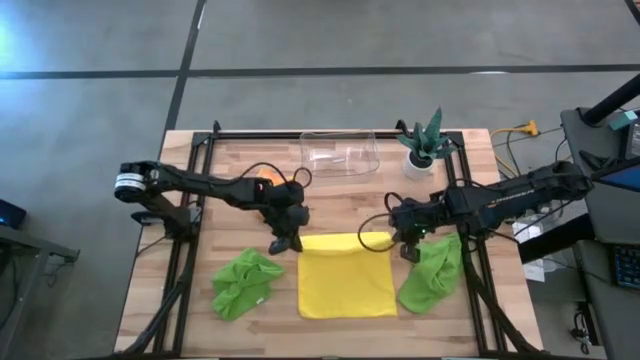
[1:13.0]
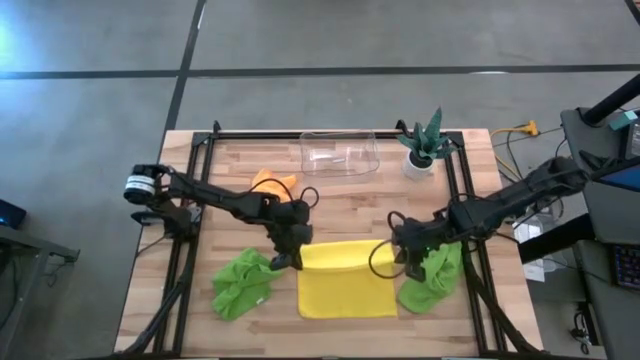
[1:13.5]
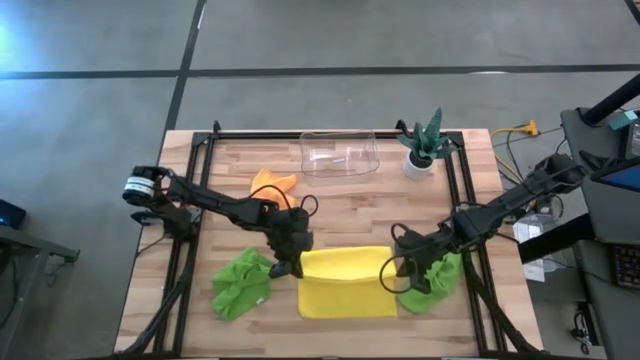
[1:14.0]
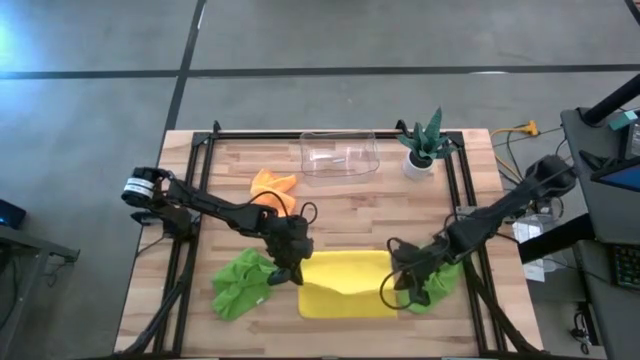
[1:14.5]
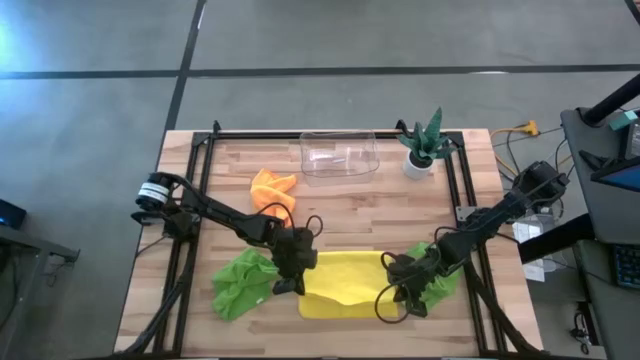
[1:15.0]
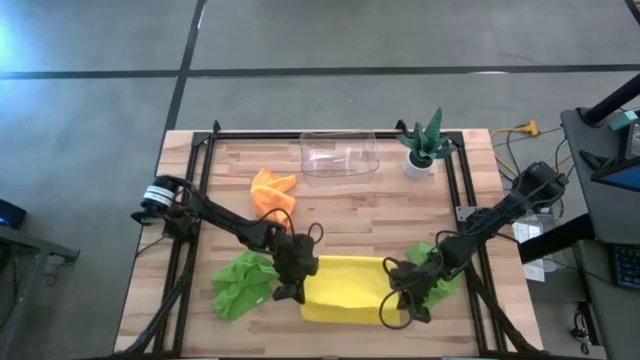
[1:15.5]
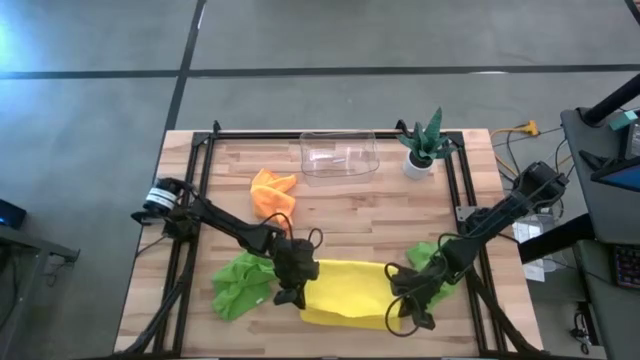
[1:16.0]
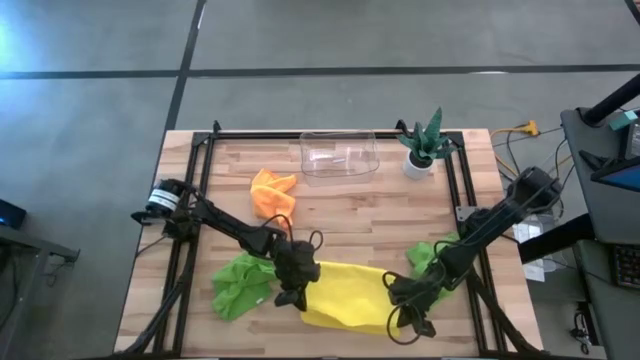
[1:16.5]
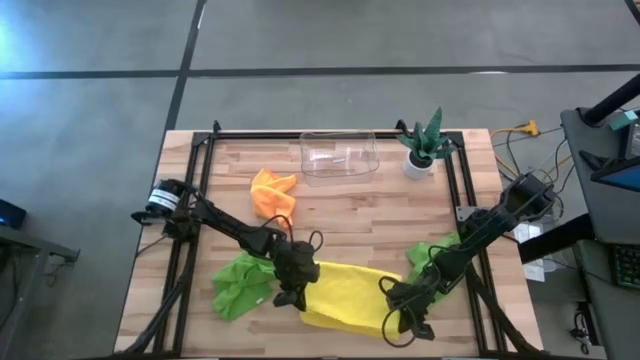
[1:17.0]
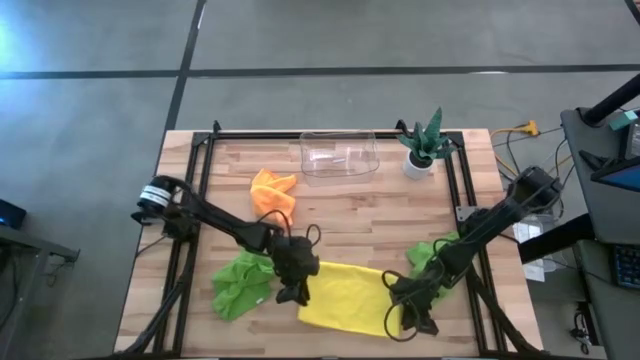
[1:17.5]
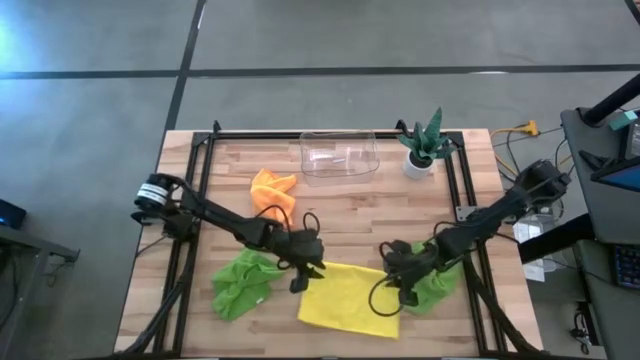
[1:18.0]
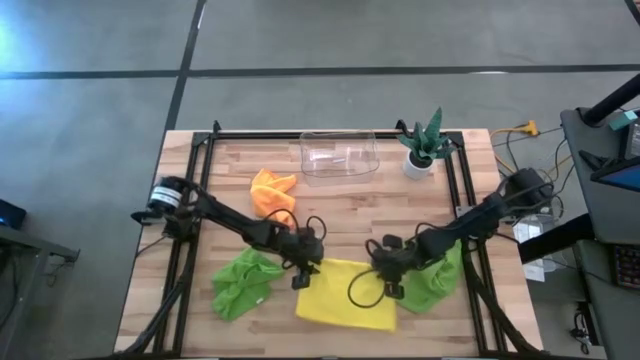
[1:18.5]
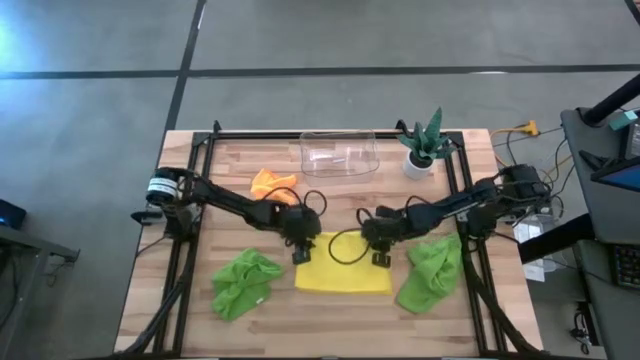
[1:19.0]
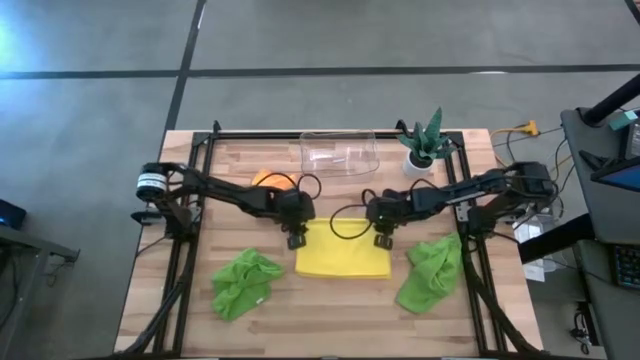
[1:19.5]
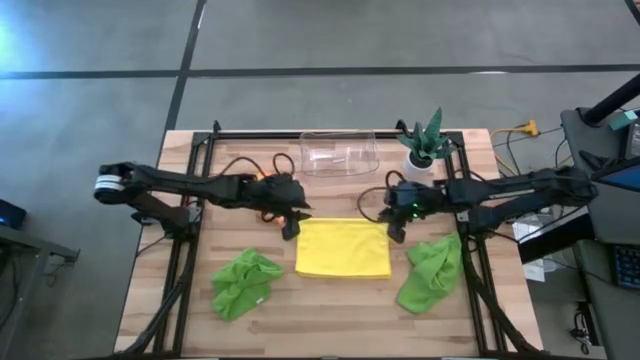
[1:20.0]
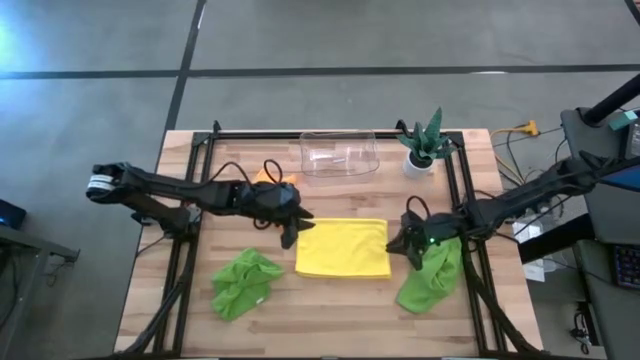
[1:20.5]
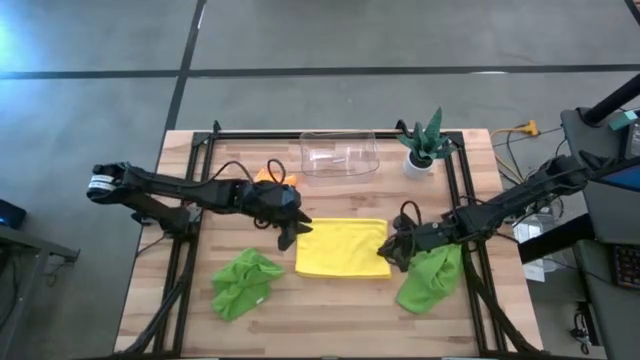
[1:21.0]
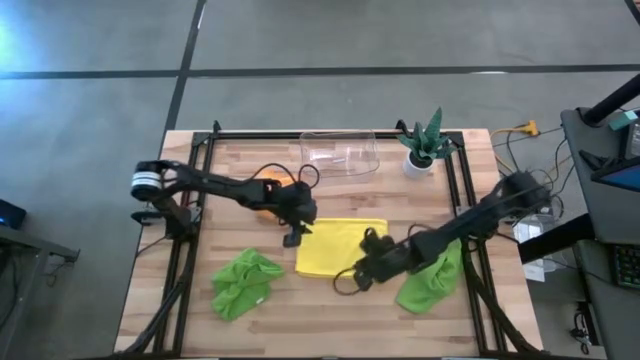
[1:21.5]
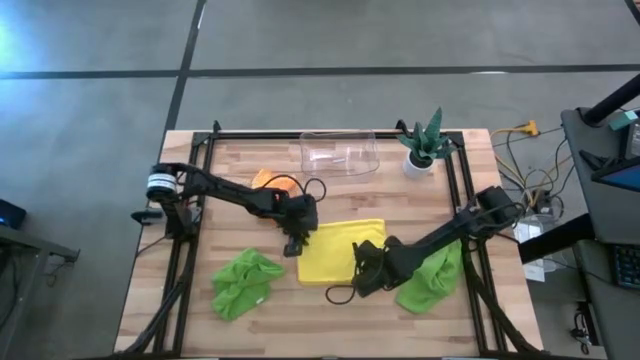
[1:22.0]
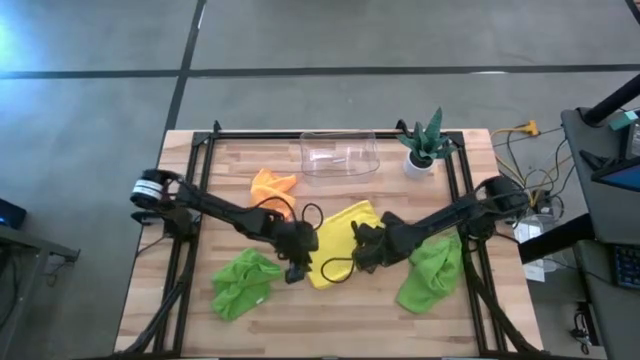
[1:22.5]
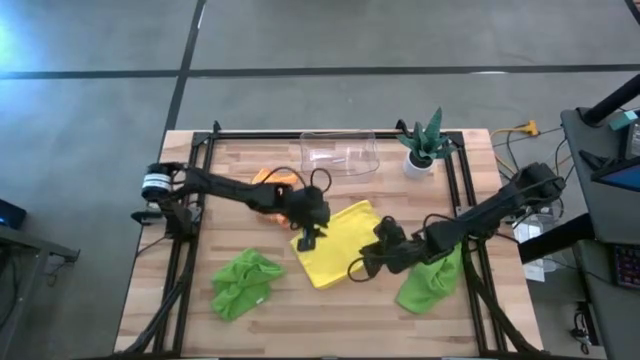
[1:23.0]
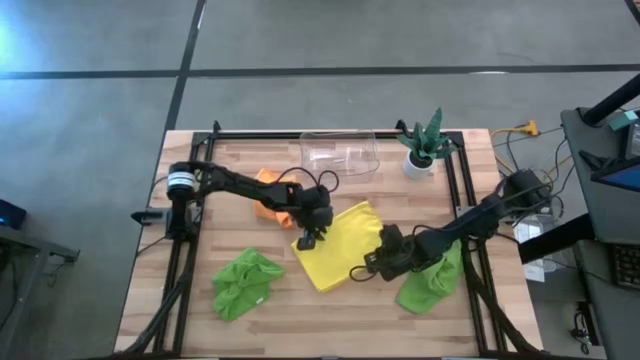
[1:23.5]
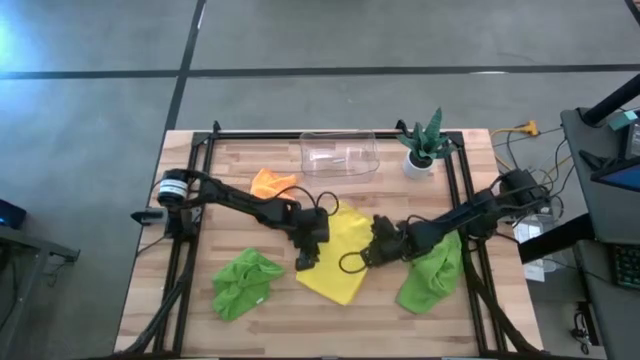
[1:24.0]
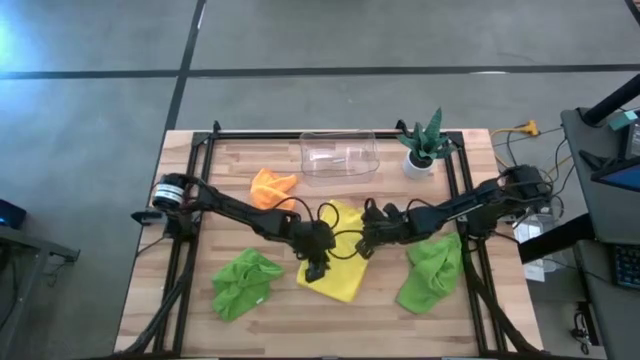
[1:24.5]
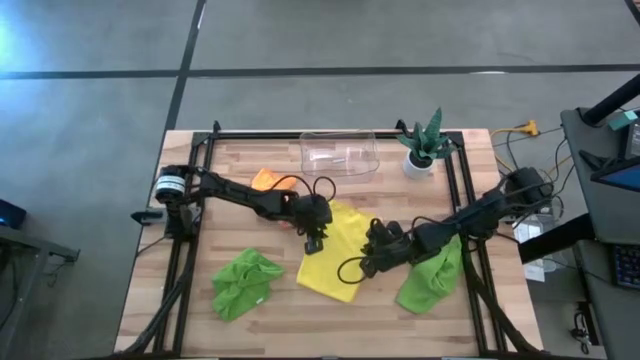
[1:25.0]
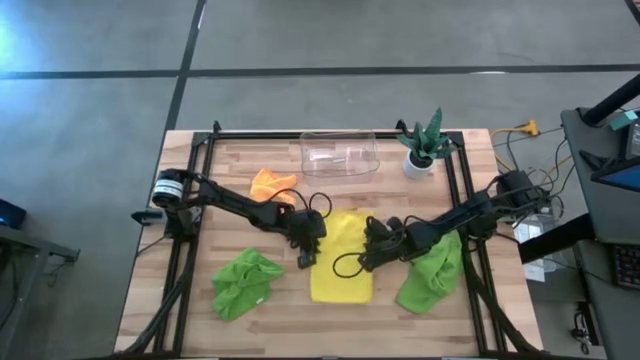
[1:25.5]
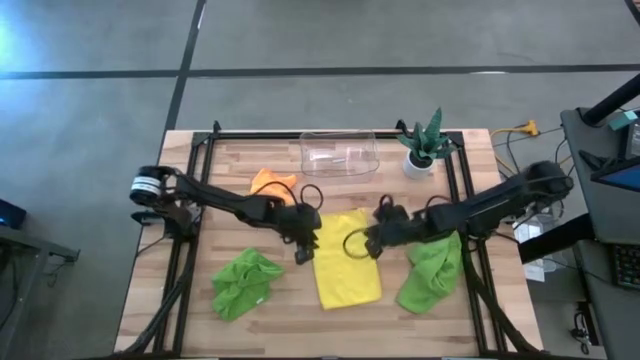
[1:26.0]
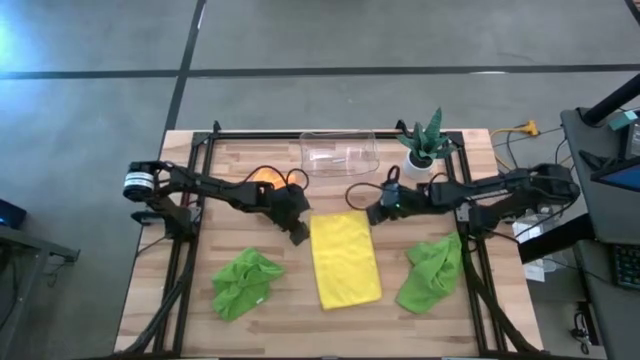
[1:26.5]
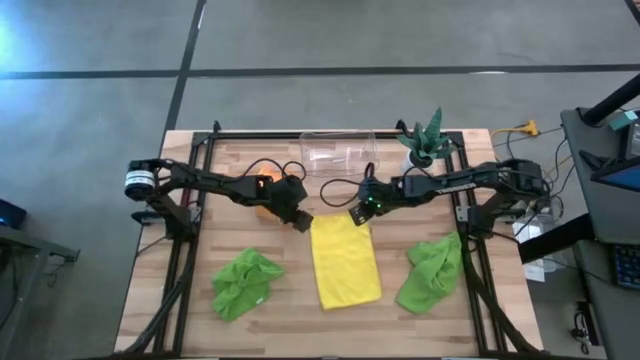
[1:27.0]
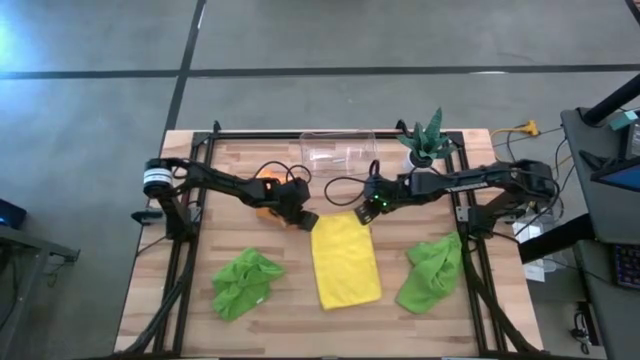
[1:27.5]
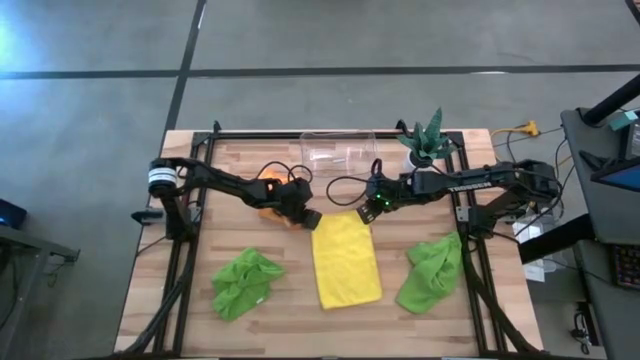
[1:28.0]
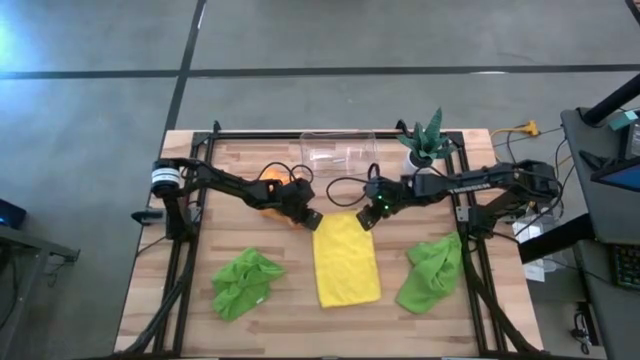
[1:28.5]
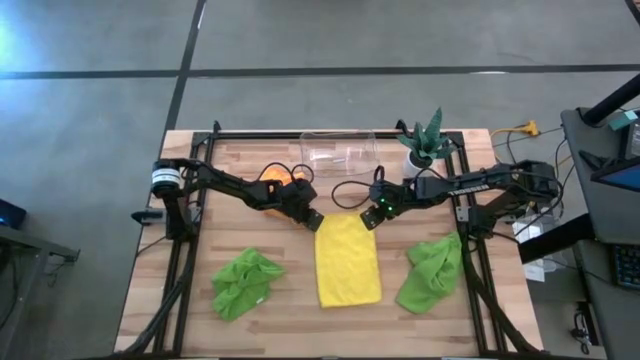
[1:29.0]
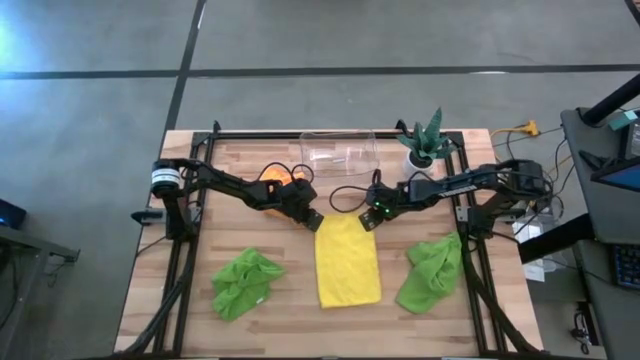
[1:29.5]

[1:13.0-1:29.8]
Task: Fold microfiber towels
Fold the yellow microfiber towel

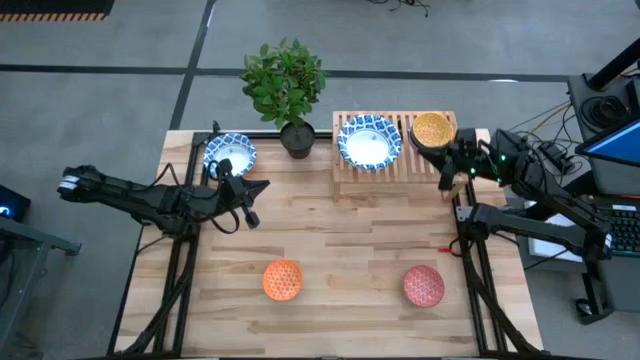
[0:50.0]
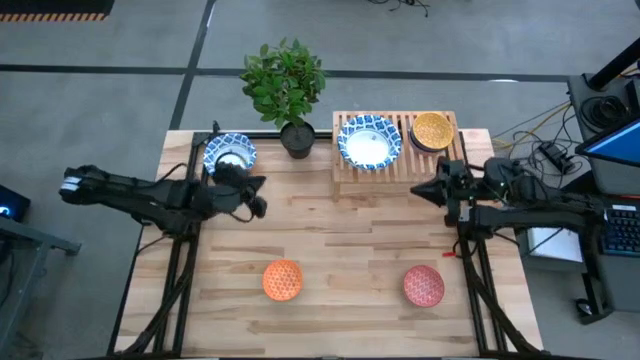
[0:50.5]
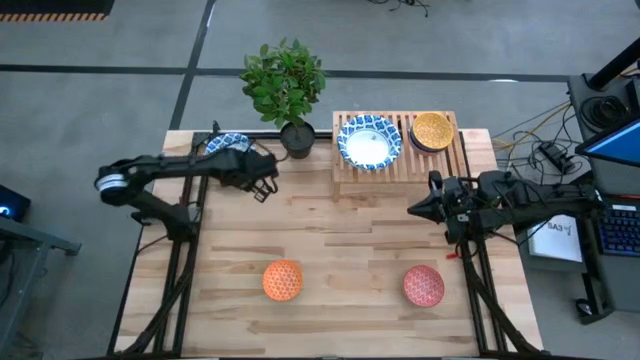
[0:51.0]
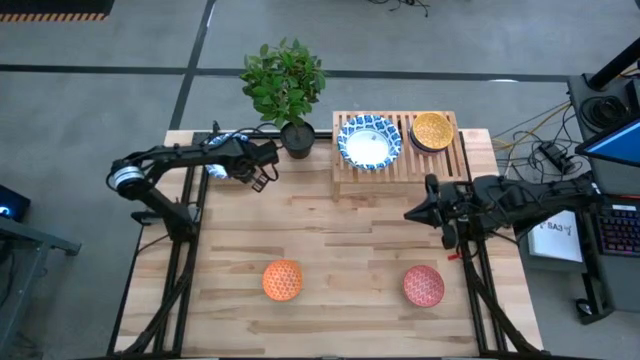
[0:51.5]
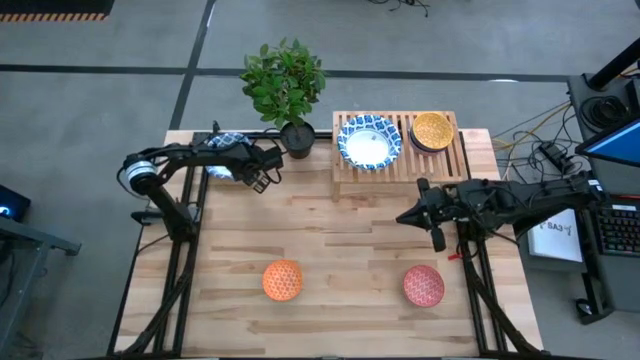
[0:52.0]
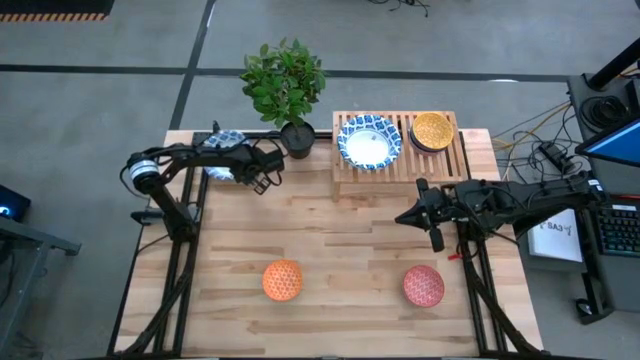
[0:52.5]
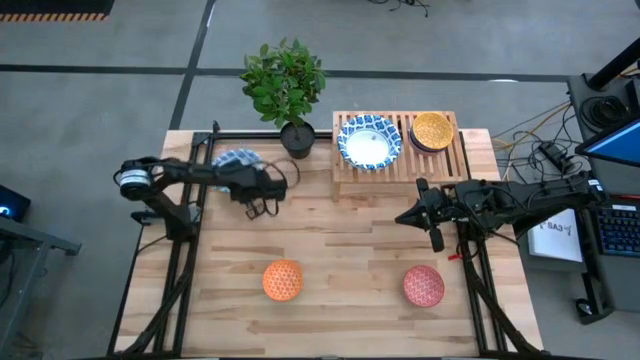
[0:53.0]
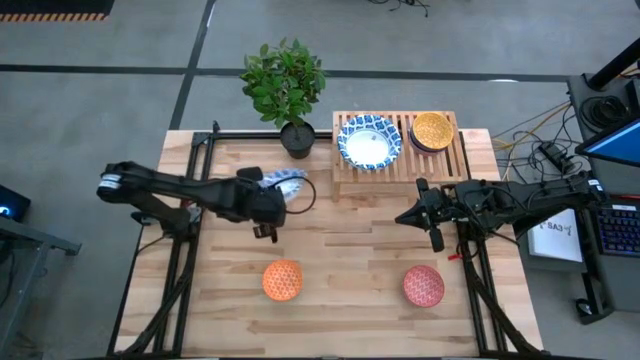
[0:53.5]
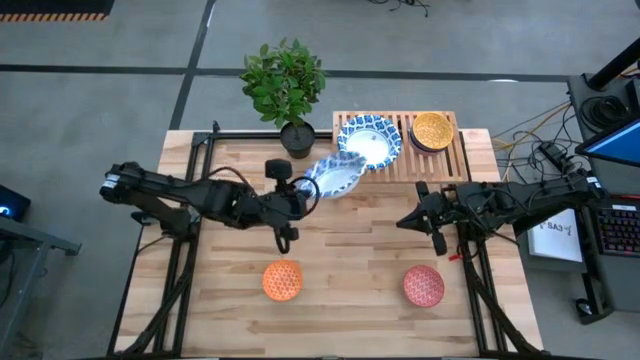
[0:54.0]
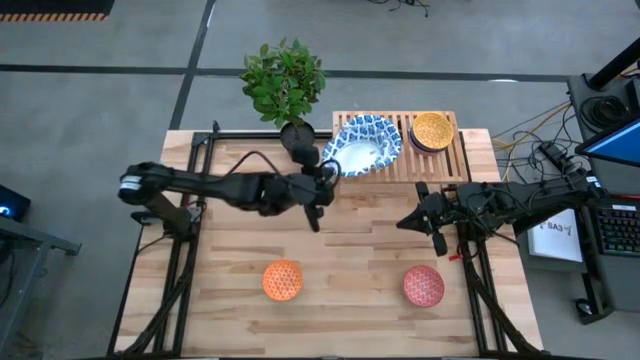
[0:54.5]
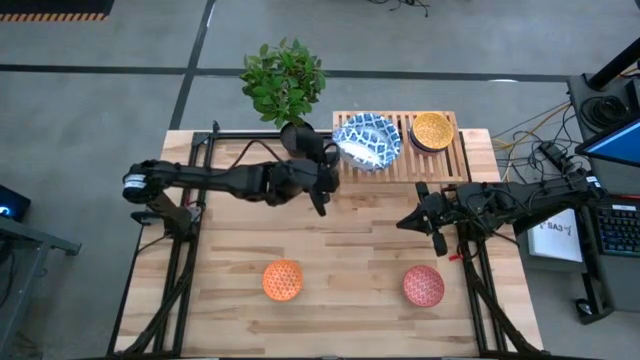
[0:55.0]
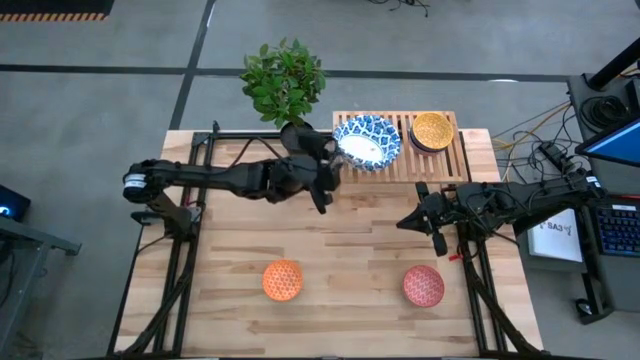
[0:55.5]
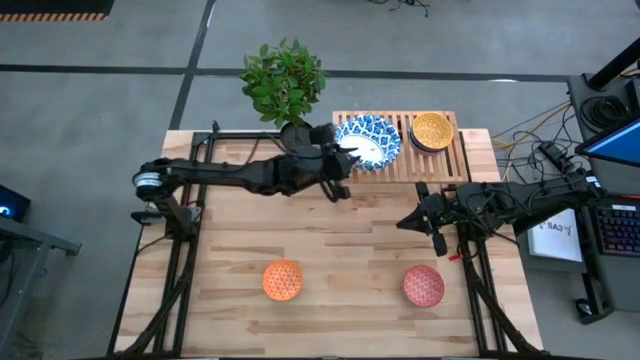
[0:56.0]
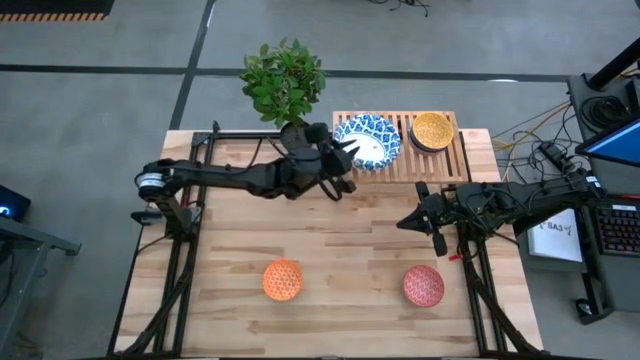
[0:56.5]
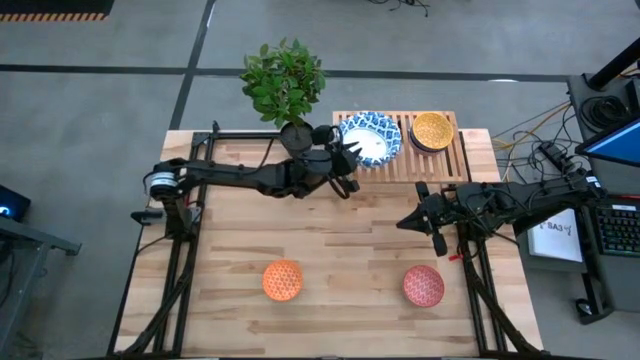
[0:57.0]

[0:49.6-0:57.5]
Task: Place and stack bowls onto a shelf
Stack the white bowl on top of the white bowl on the shelf
